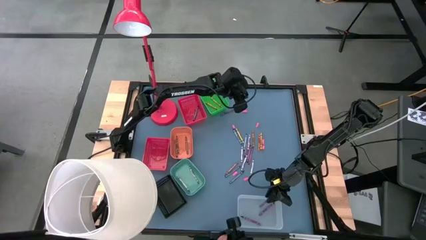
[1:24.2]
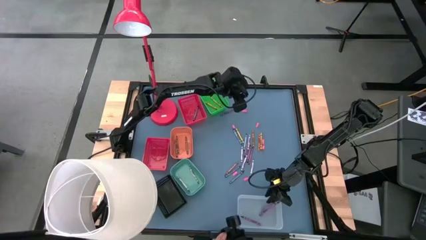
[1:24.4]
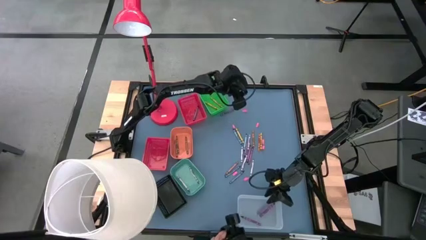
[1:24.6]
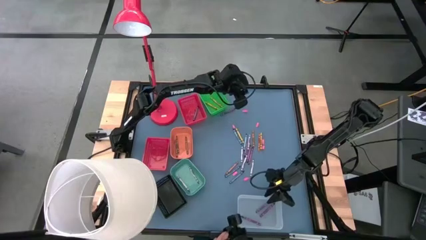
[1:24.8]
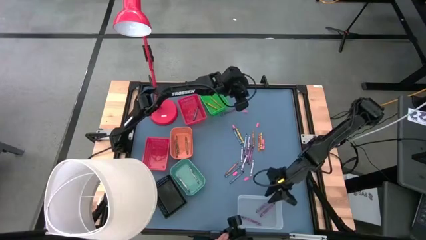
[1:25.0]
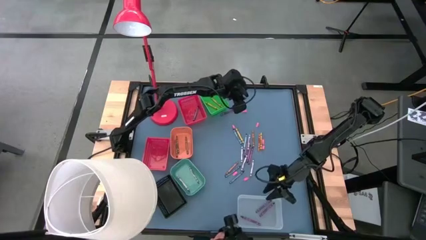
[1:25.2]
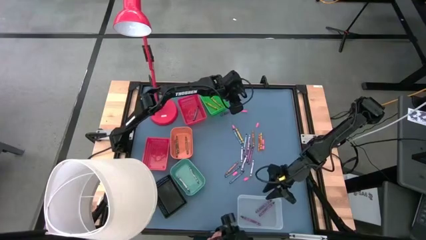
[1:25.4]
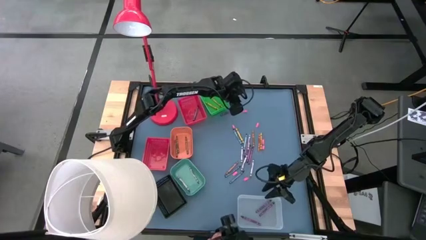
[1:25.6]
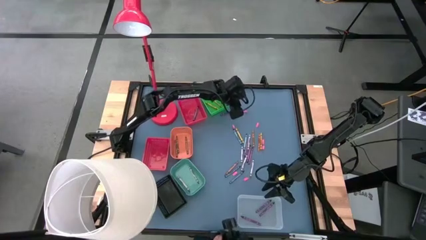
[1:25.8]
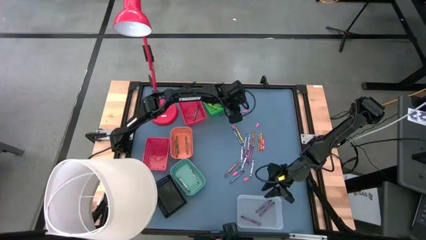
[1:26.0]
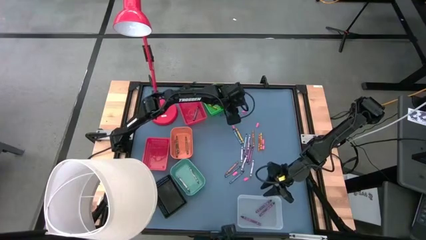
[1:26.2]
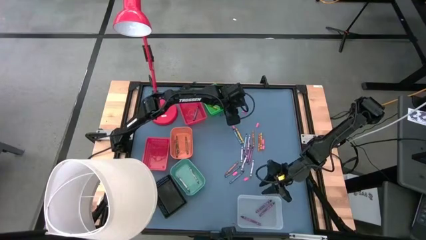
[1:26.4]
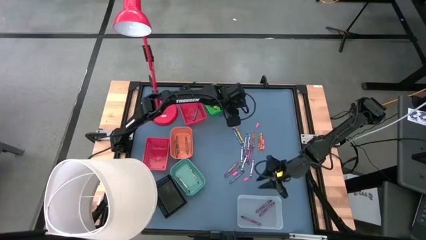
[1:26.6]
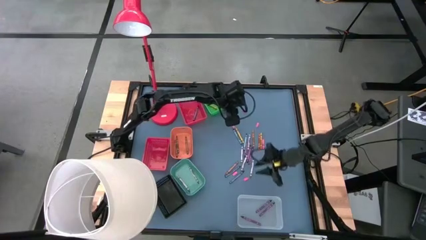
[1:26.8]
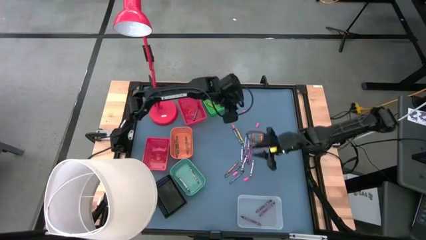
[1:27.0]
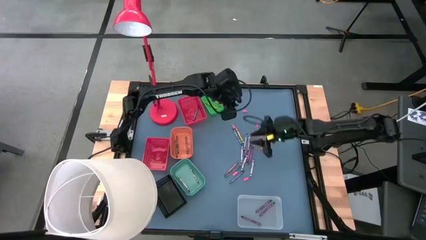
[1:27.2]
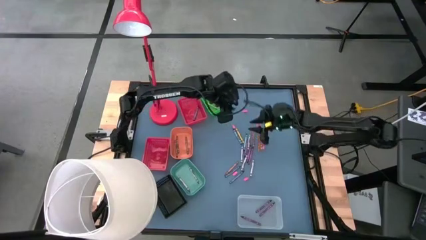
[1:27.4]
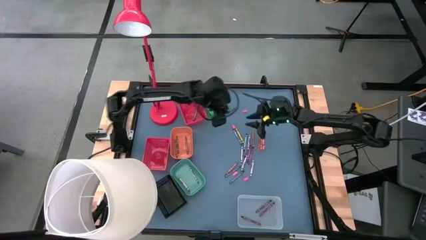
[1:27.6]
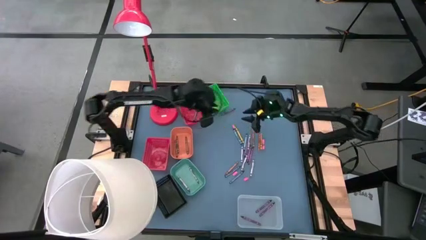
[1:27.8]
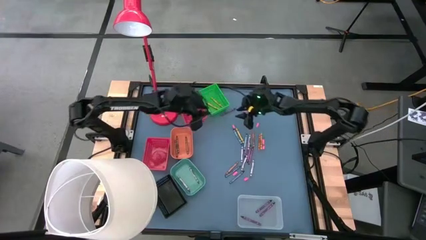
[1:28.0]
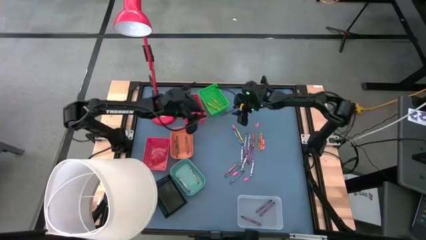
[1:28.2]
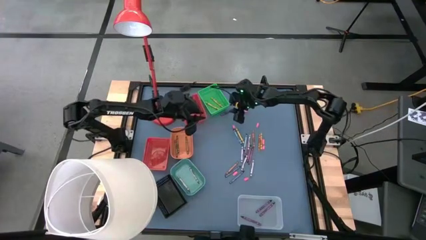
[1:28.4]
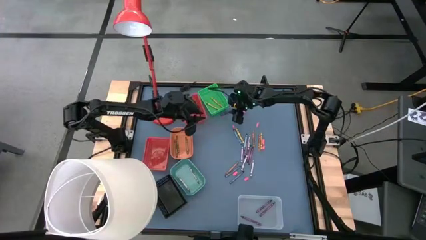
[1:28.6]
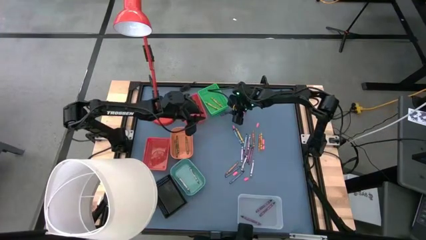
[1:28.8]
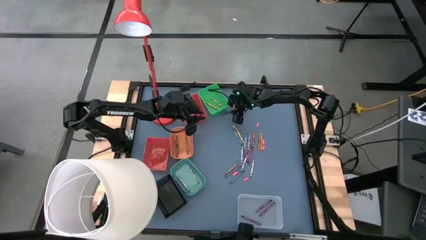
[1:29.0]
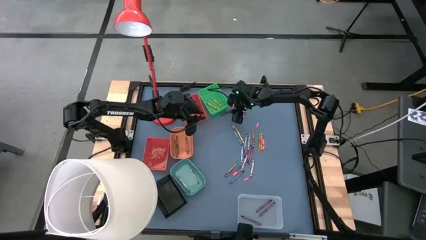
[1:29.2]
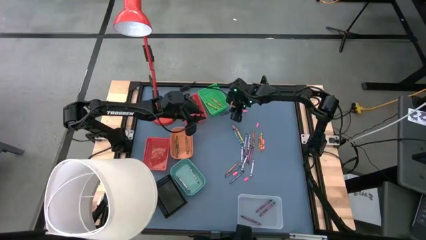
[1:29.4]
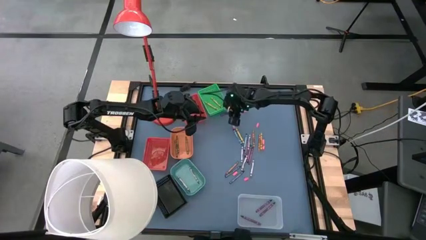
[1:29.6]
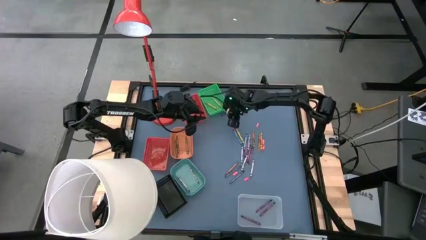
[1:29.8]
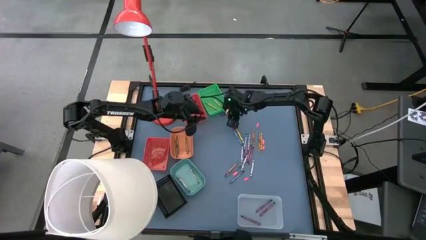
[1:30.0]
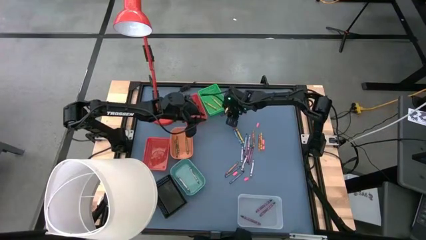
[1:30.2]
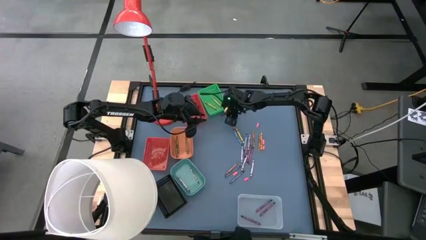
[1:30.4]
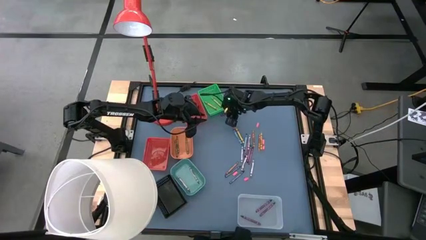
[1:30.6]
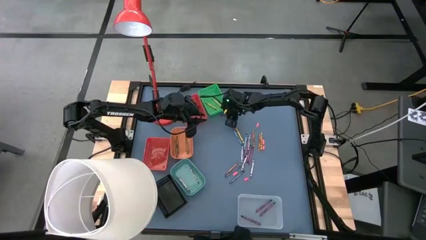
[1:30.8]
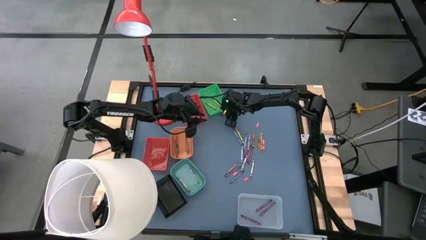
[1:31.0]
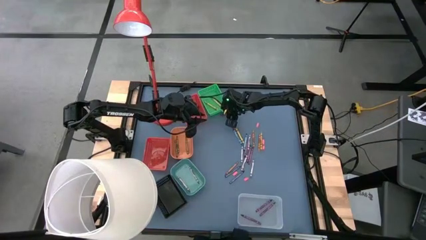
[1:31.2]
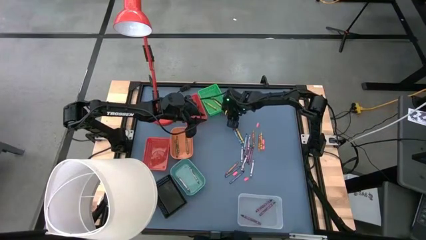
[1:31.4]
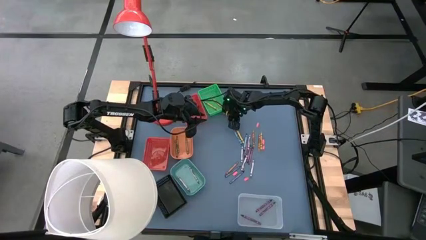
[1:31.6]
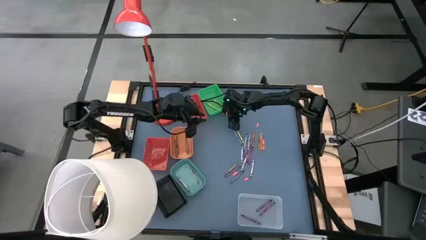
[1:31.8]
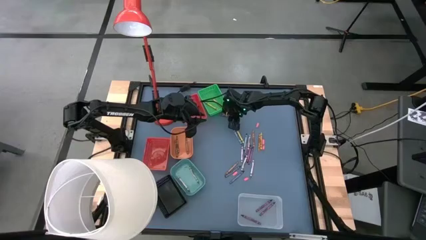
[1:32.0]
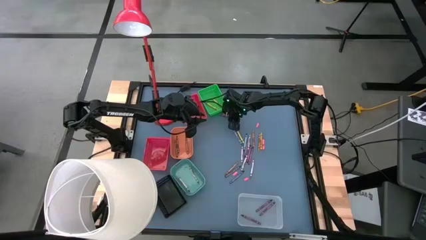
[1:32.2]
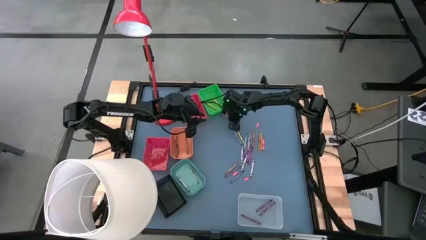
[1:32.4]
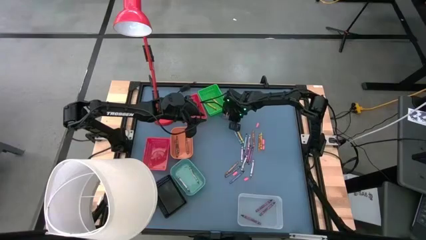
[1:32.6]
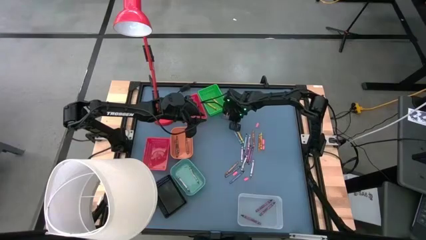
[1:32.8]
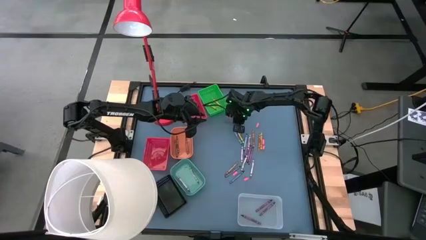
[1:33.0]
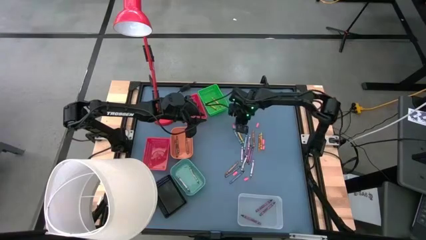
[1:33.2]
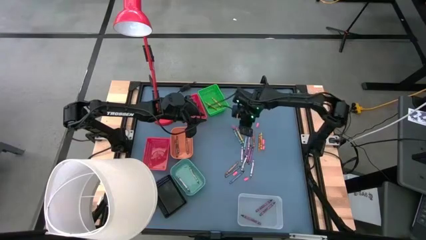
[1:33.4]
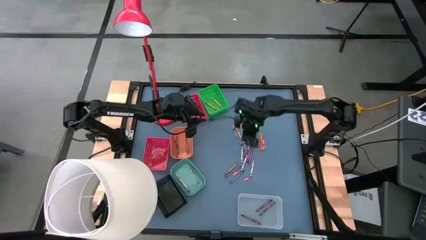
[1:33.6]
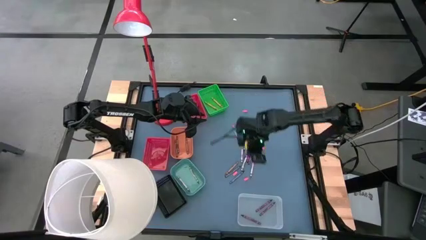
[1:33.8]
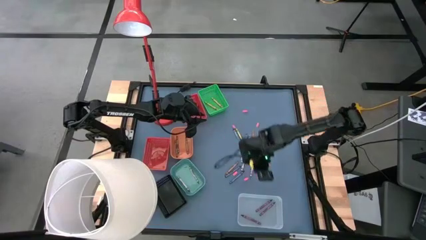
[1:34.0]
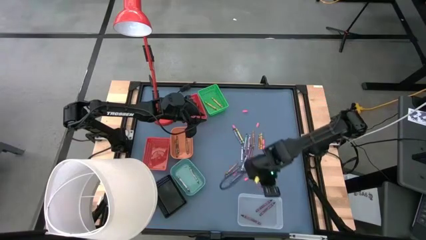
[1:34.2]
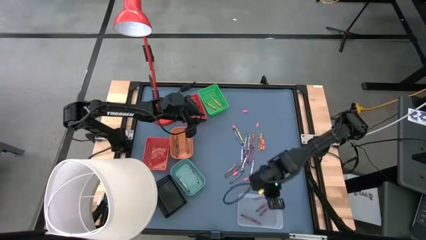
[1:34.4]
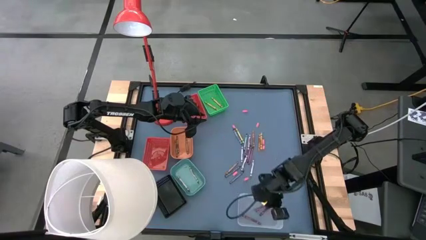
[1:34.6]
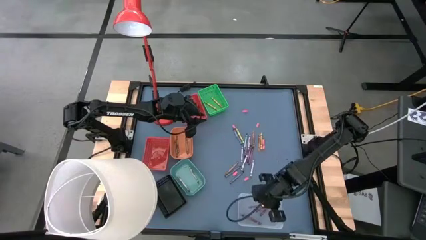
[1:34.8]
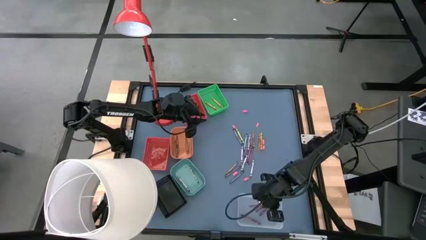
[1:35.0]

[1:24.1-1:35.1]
Task: Sort crayons
Put the purple crayon into the white bin

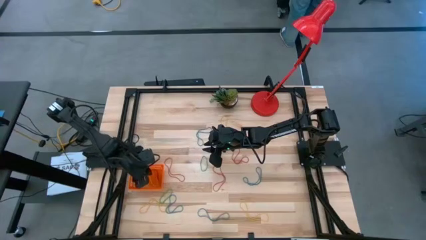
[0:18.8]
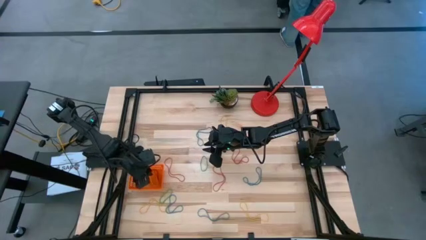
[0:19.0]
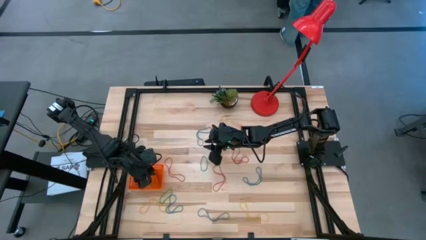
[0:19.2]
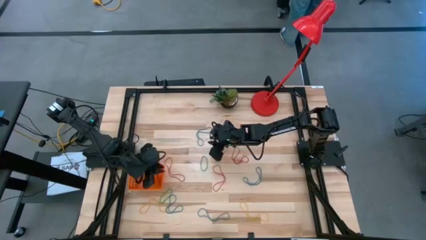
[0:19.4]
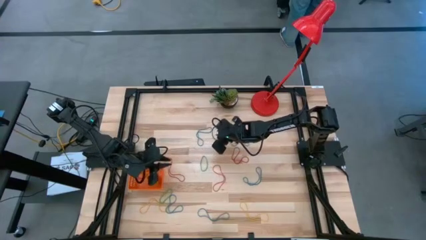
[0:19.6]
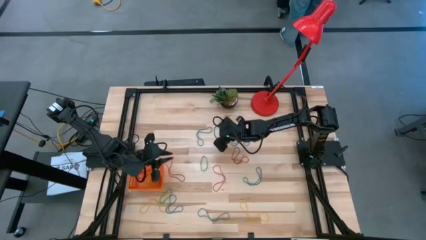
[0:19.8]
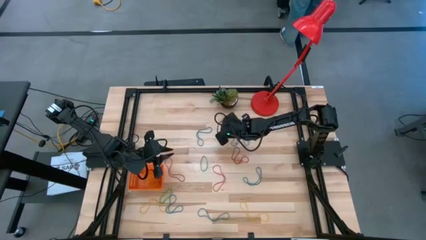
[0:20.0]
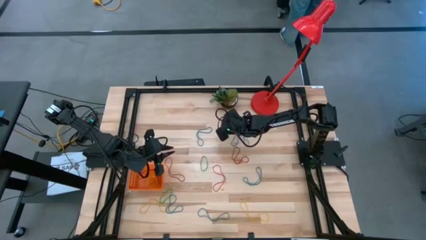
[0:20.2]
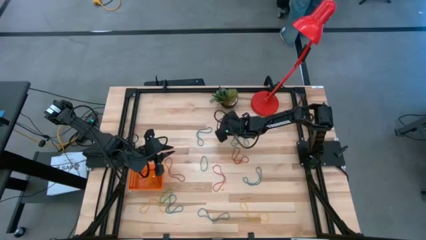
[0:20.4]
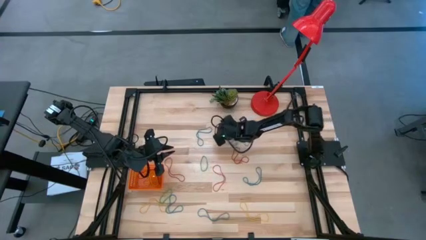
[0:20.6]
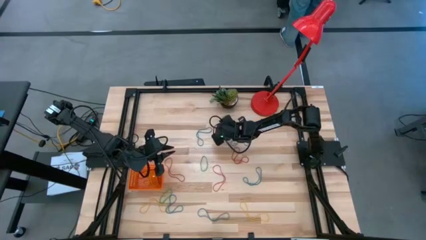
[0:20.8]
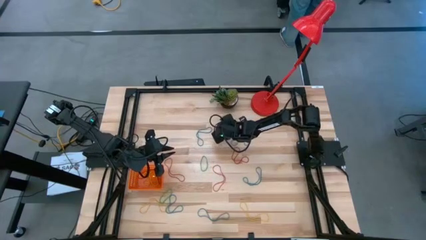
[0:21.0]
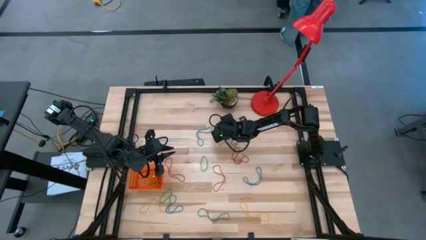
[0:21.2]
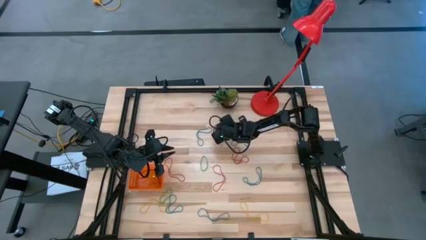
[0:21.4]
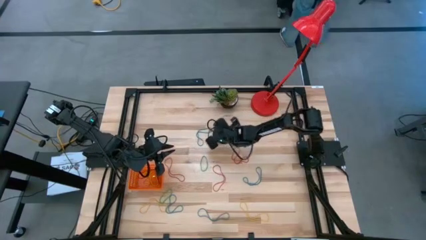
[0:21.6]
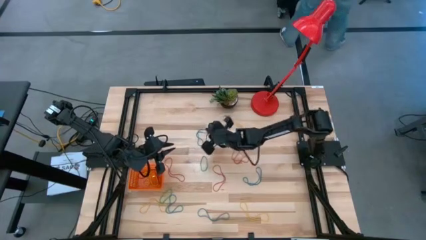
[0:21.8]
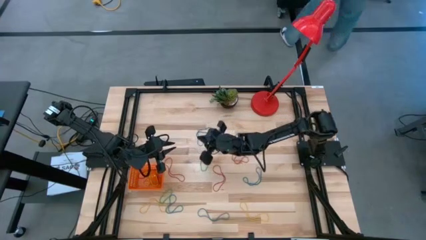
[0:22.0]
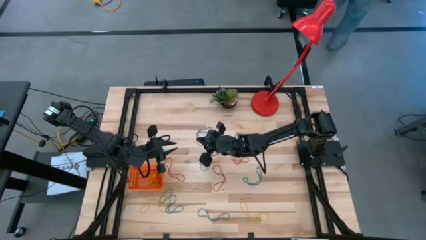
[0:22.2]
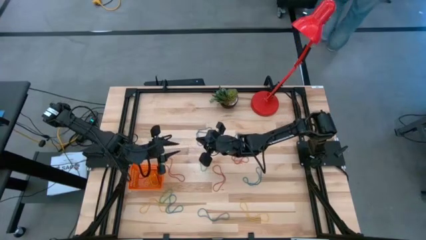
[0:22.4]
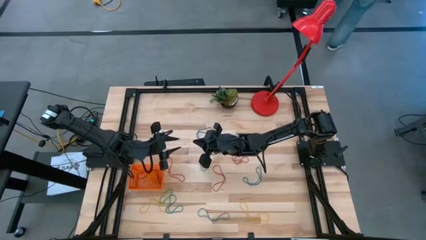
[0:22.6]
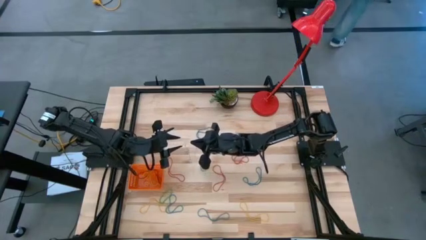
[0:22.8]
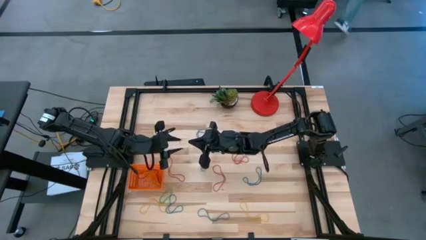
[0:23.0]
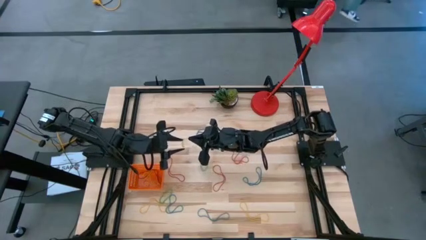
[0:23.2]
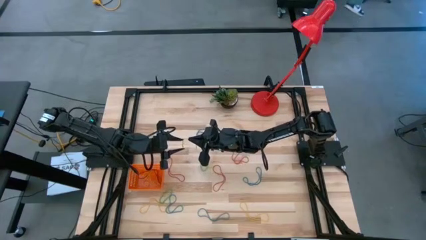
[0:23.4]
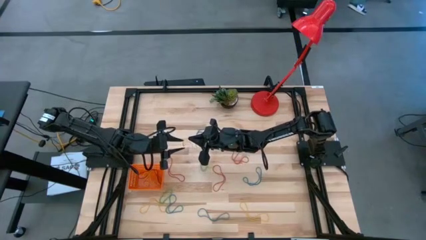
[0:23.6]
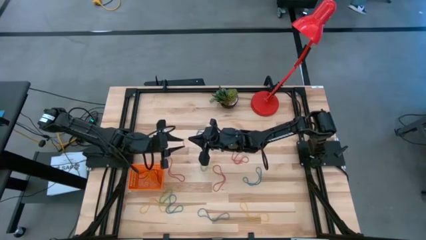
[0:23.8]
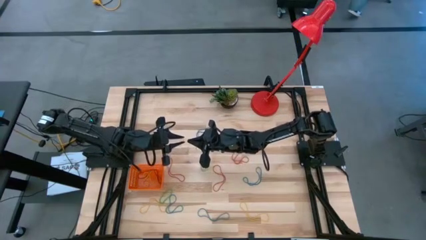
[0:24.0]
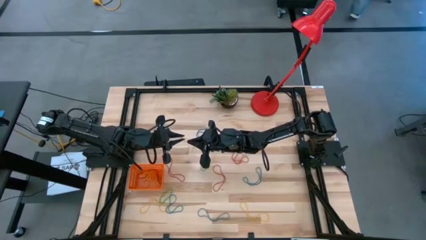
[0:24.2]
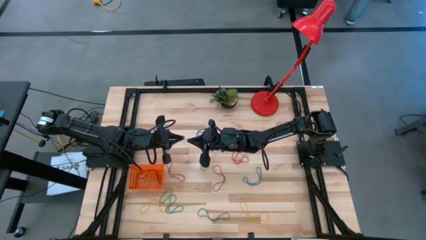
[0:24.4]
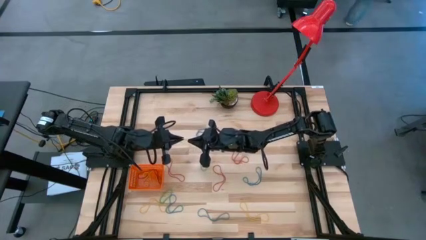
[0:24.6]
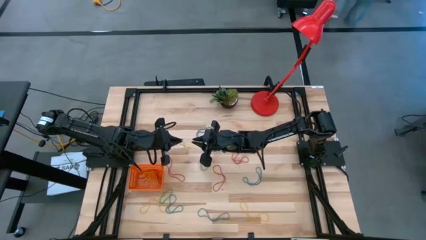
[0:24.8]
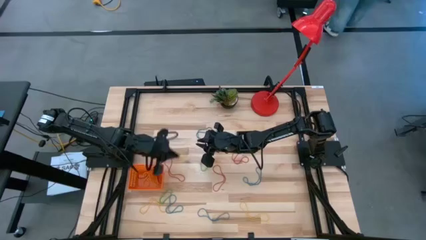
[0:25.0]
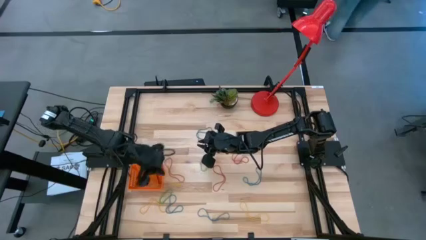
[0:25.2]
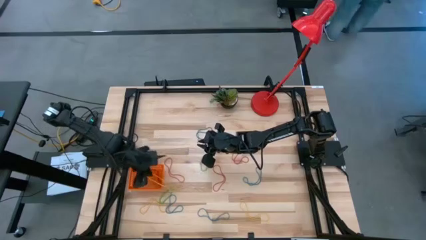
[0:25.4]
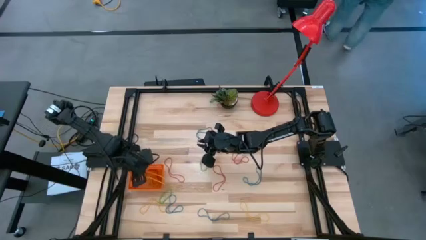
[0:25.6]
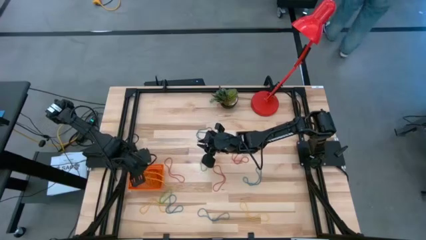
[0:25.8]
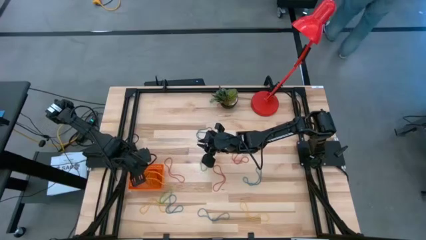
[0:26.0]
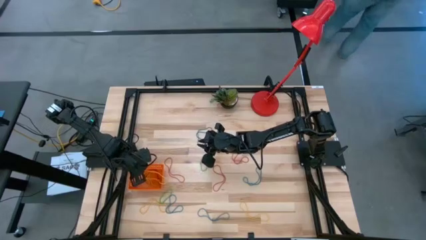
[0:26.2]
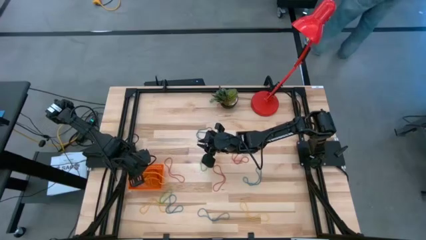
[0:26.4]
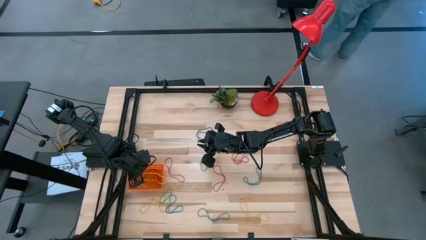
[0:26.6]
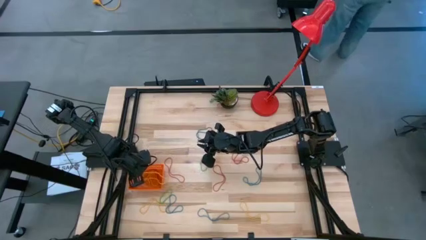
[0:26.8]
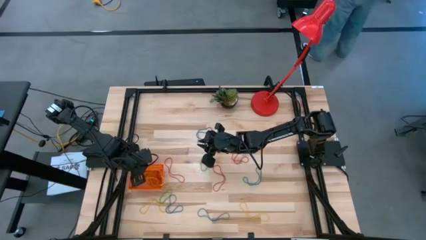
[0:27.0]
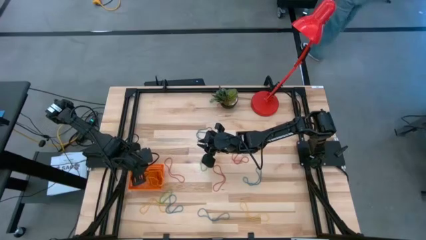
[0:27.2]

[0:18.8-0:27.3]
Task: Pick and place rubber bands into bin
Put the yellow rubber band into the orange basket
